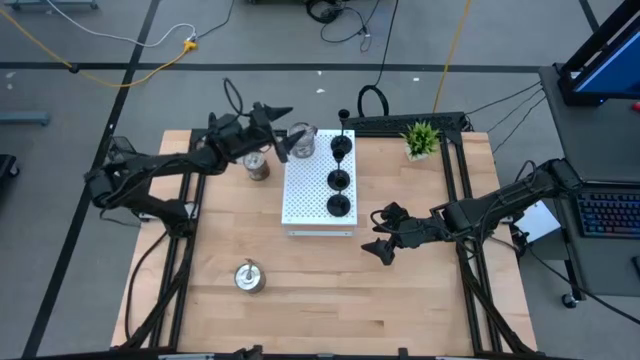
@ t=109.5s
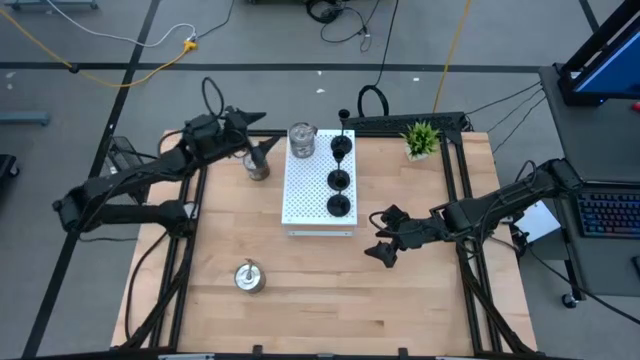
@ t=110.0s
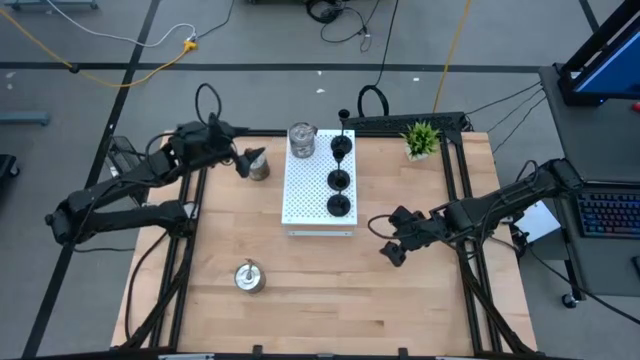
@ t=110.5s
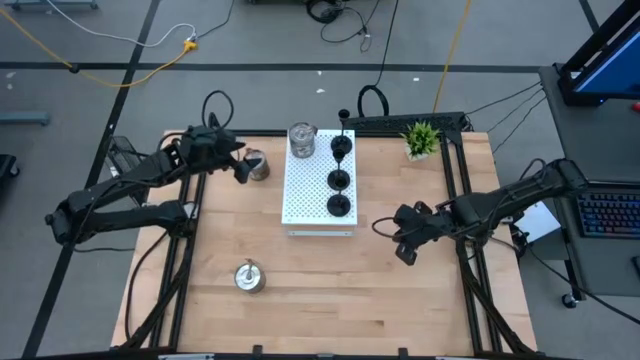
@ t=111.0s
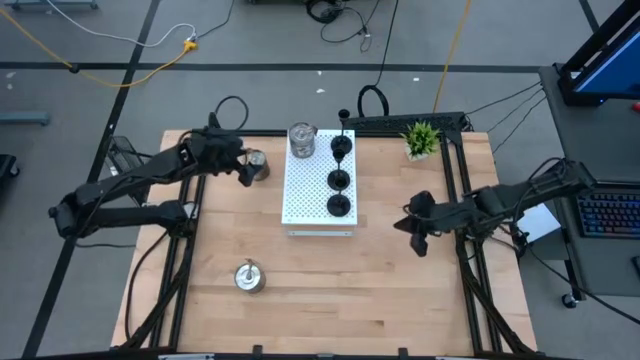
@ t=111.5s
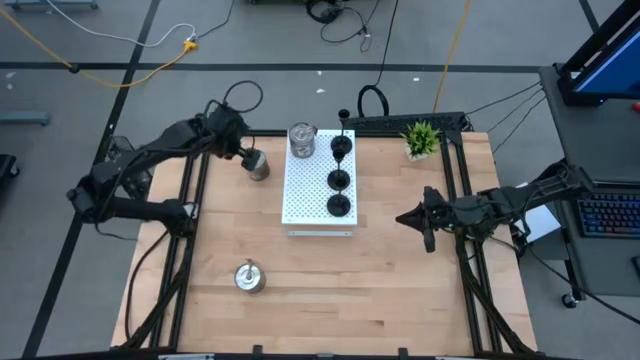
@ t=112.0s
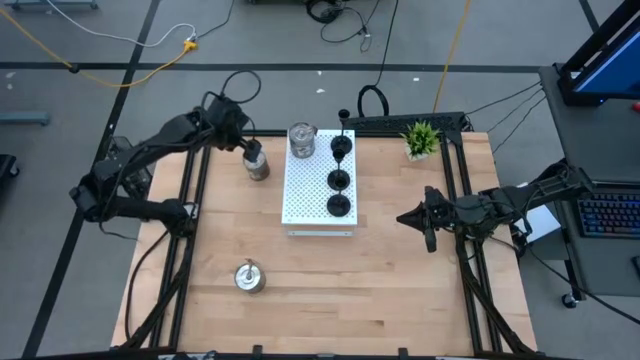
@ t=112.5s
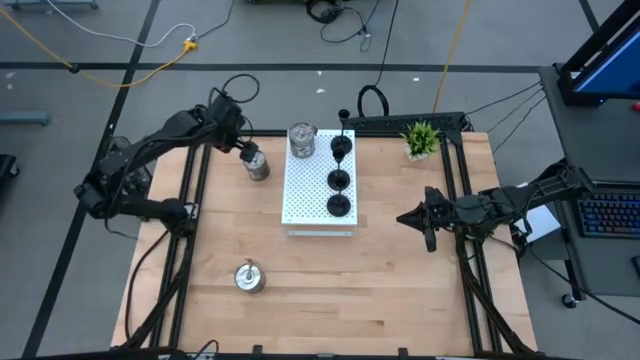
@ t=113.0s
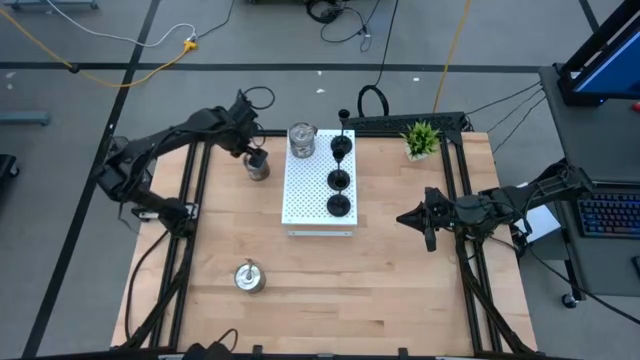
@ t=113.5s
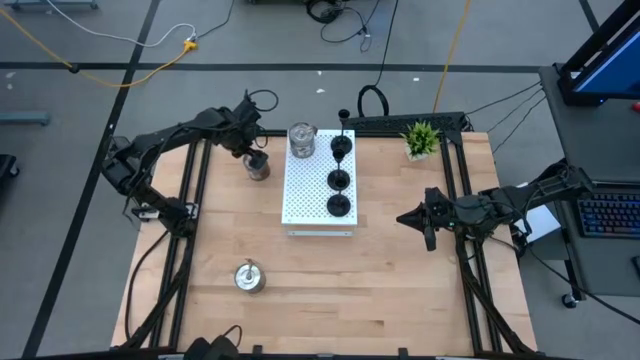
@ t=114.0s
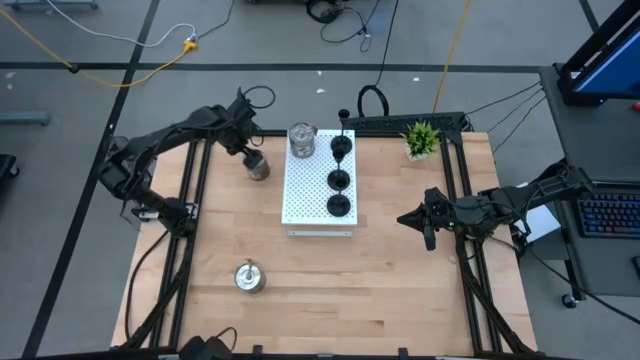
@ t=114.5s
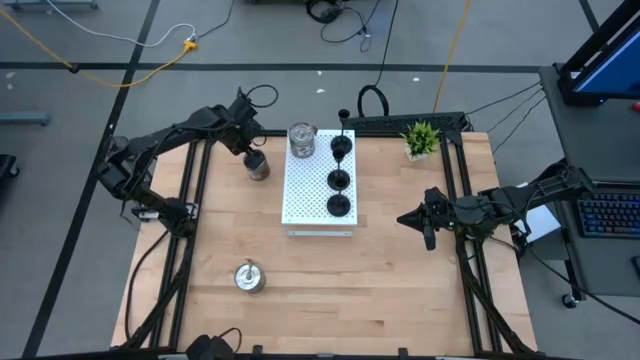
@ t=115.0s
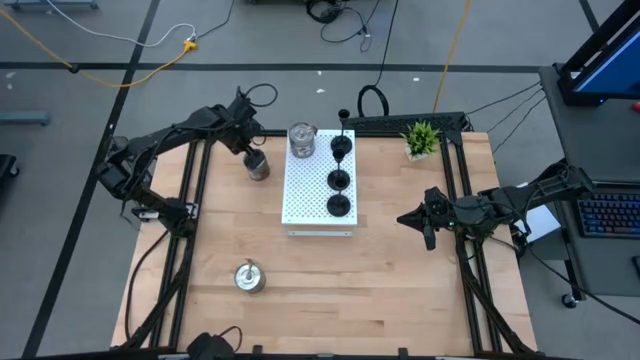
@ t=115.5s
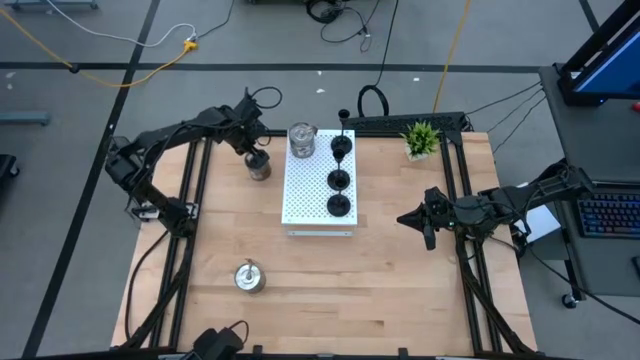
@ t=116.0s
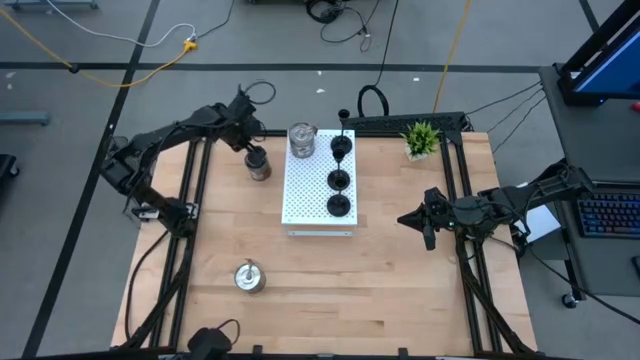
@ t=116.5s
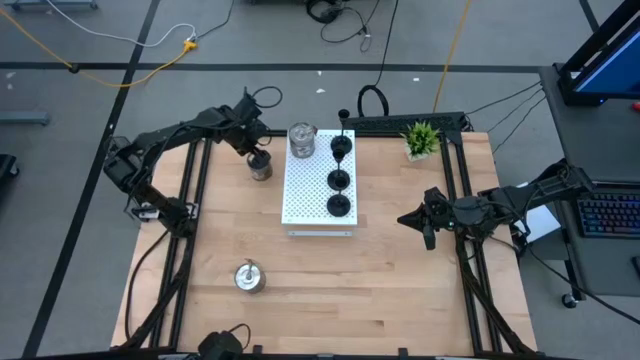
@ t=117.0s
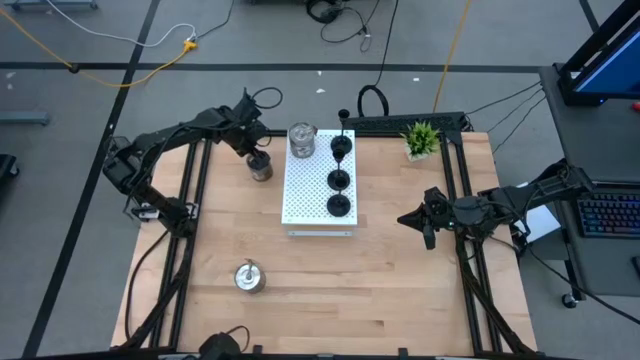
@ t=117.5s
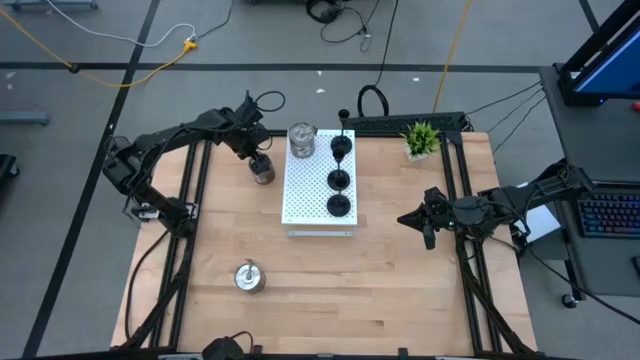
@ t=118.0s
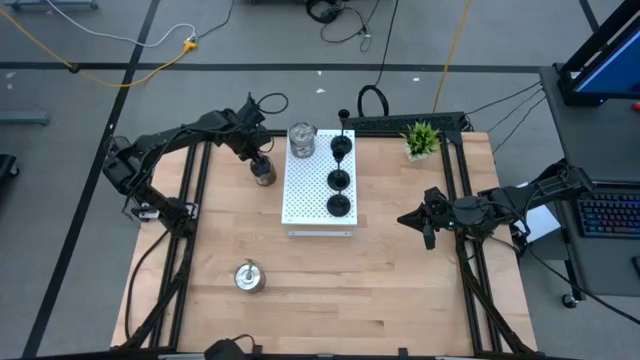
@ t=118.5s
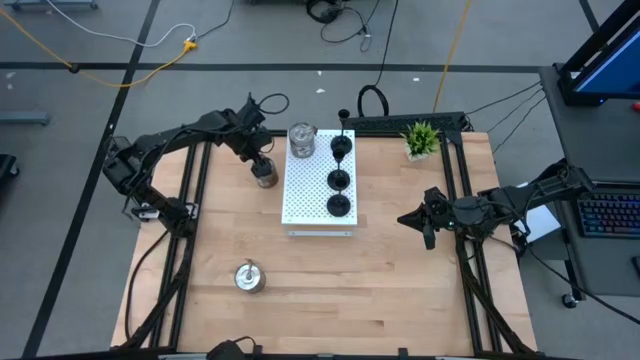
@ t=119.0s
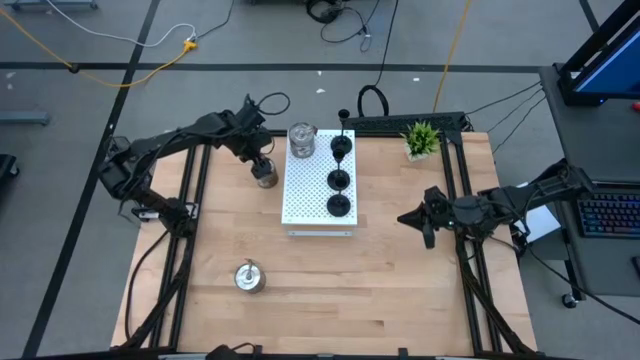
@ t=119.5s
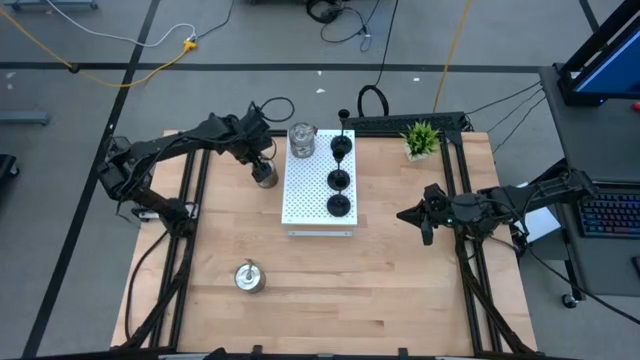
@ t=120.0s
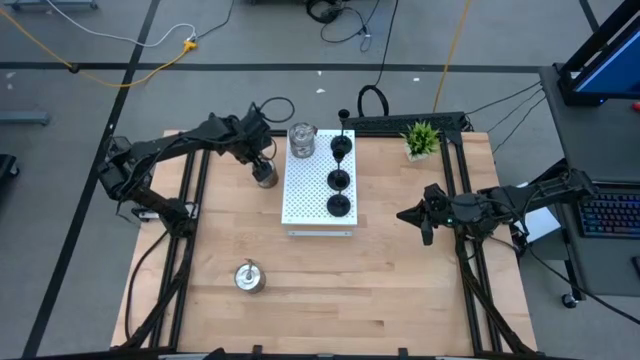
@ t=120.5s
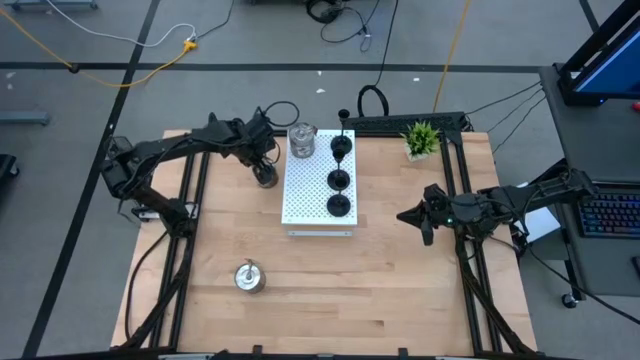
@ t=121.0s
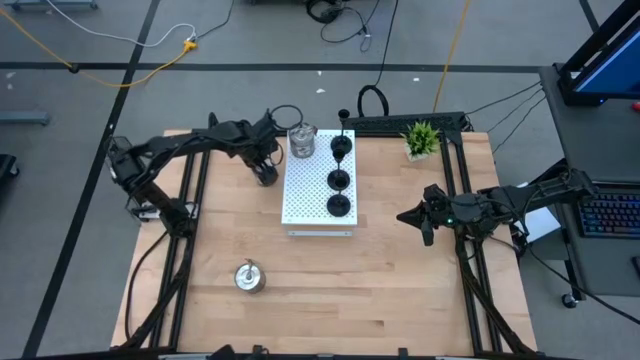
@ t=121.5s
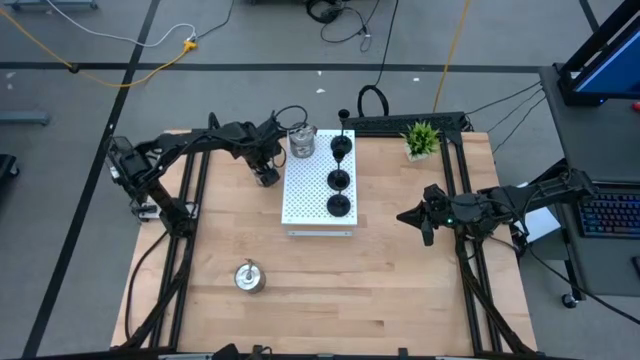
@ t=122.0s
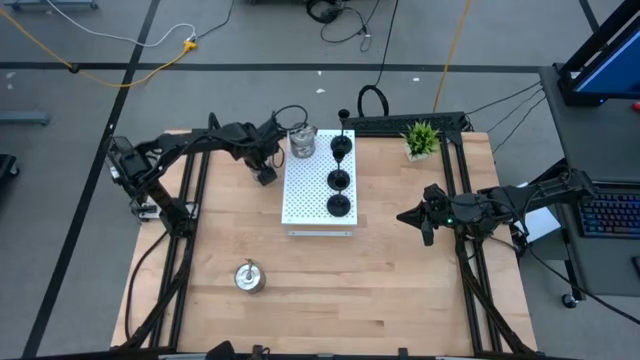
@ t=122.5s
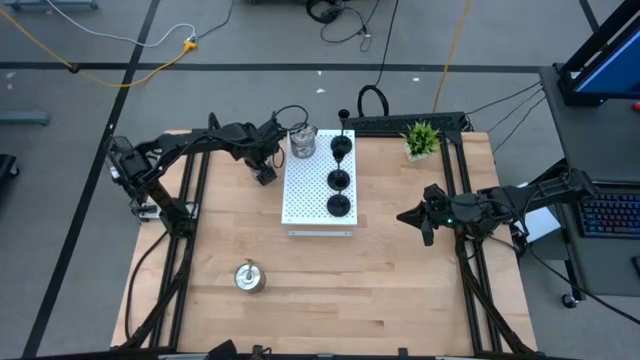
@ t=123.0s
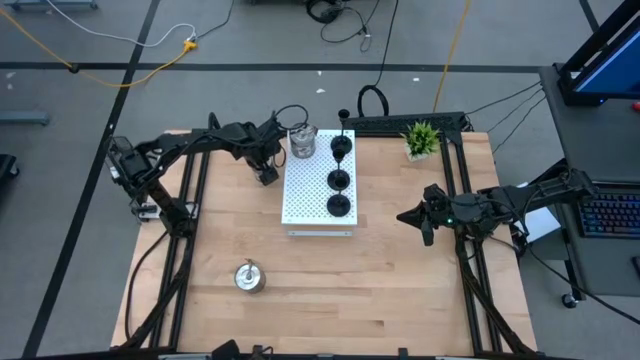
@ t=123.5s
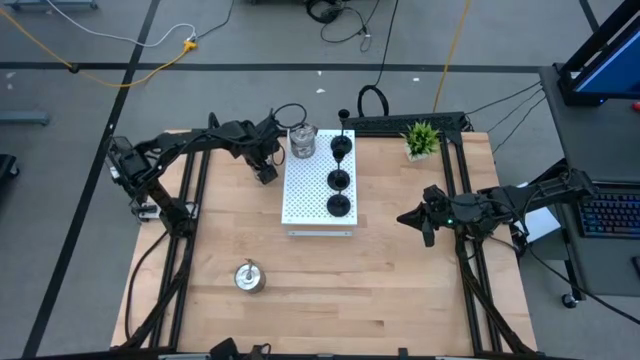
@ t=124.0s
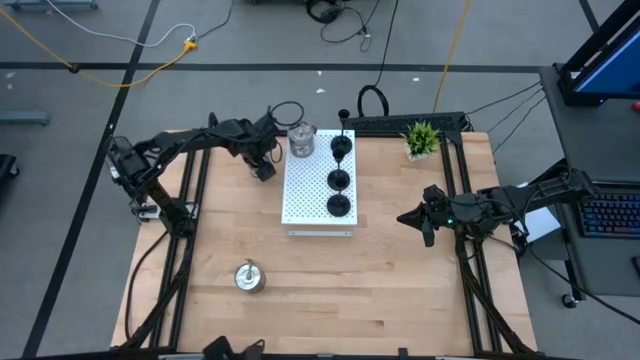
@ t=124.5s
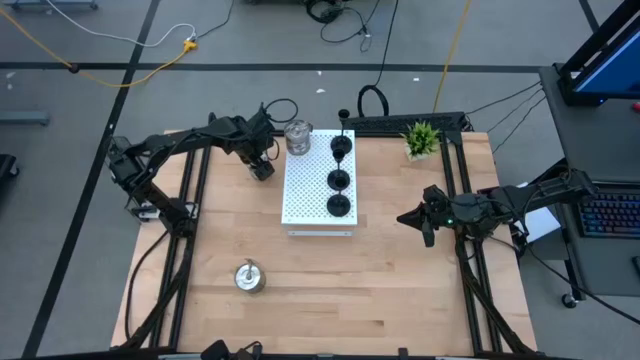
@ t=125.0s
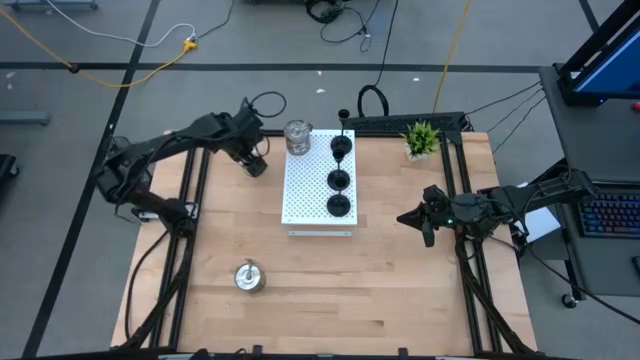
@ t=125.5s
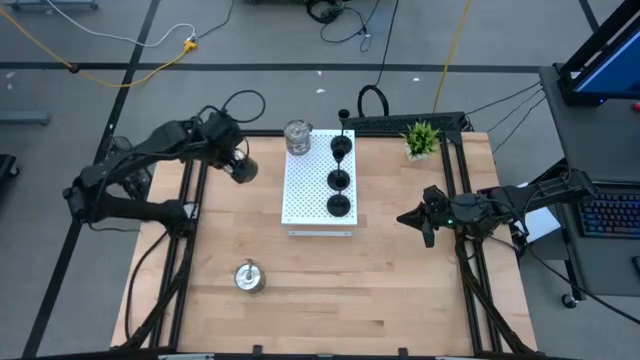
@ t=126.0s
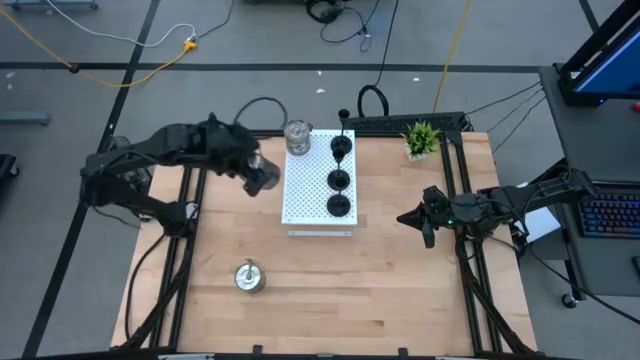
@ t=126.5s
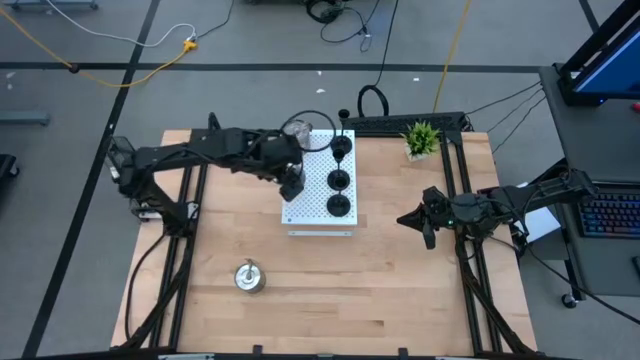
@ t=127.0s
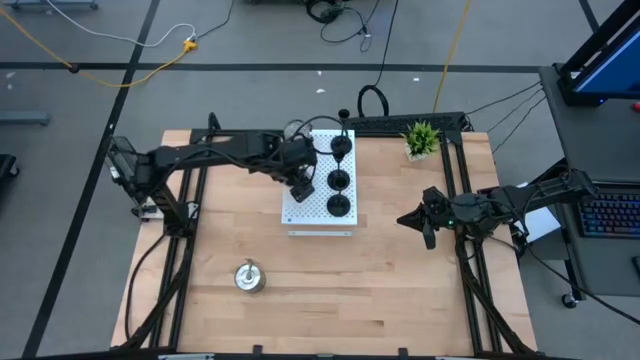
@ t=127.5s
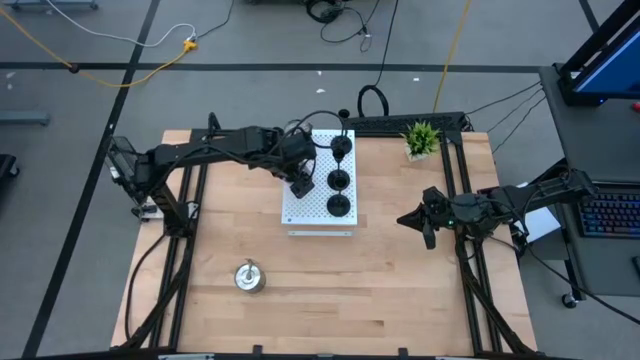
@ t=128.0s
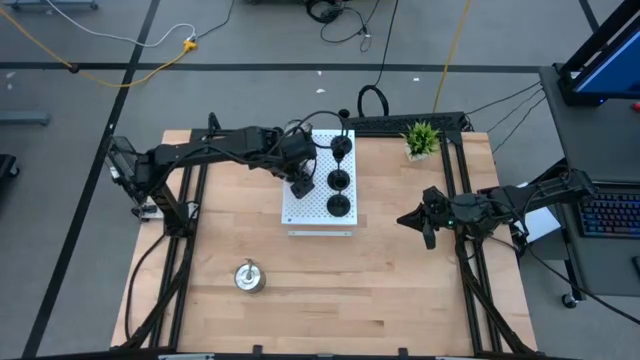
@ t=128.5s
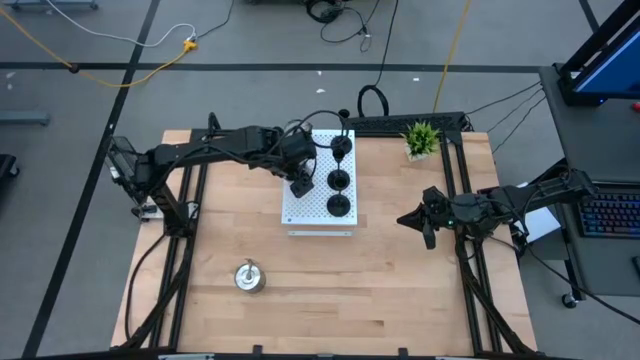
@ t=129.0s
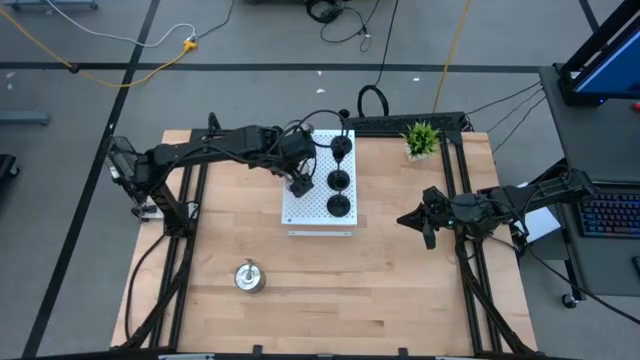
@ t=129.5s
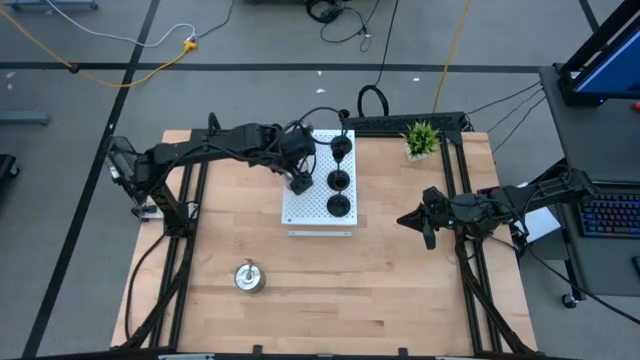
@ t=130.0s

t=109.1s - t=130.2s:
Task: Pick & Place candle stick holders
Put the top brown scented candle on the shelf aligned with the other brown scented candle
